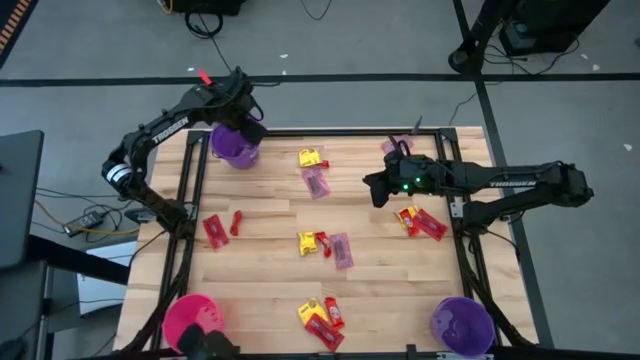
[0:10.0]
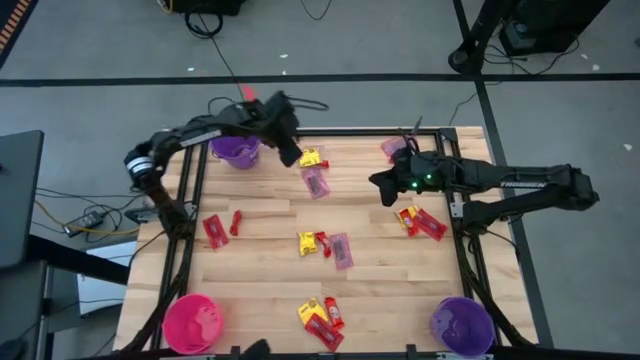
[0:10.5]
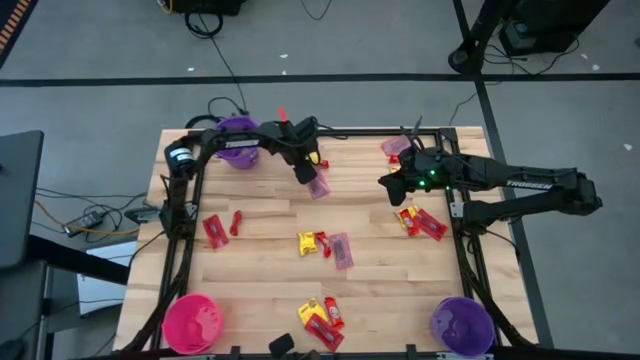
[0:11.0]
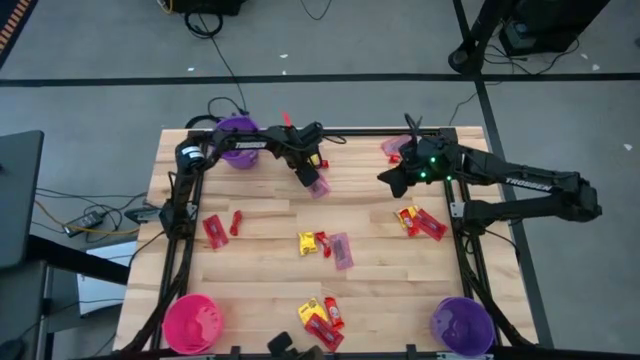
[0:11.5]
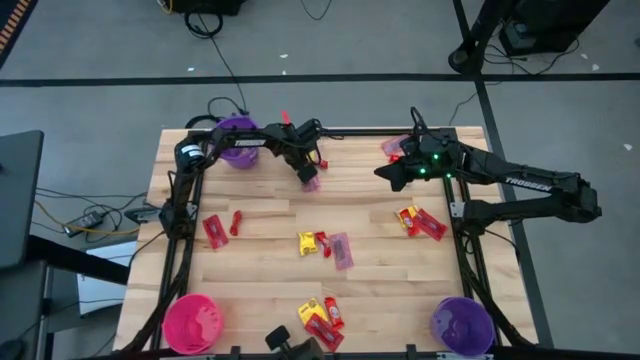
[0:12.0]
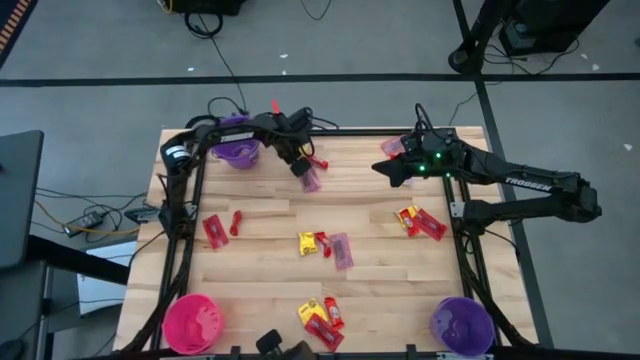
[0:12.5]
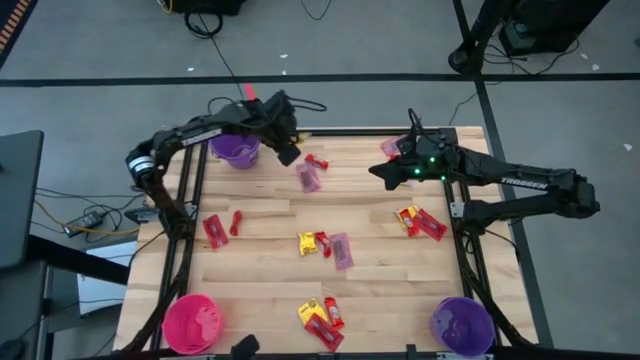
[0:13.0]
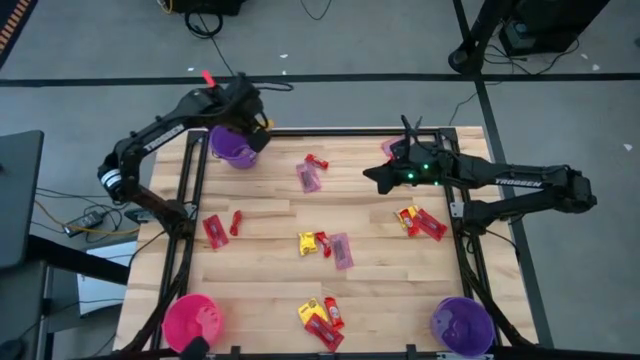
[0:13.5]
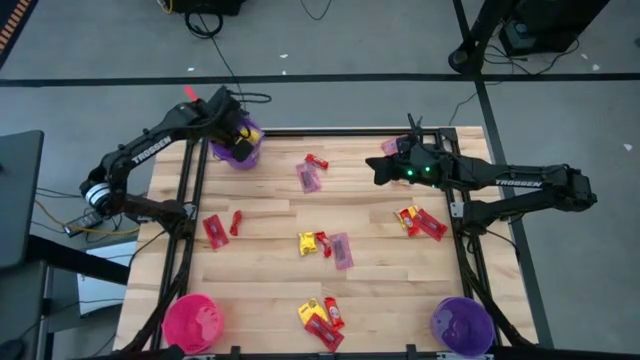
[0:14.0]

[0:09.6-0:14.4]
Task: Sort candy by brand, put in halloween buckets
Put the yellow candy into the top purple bucket

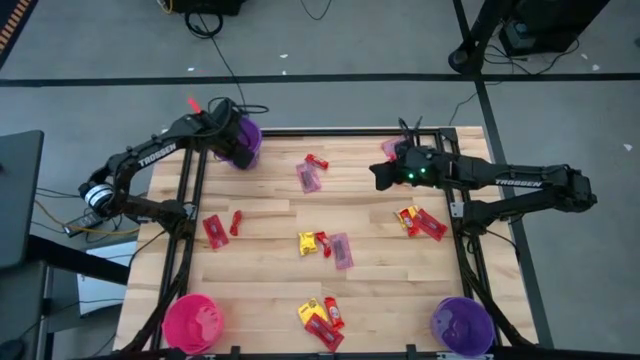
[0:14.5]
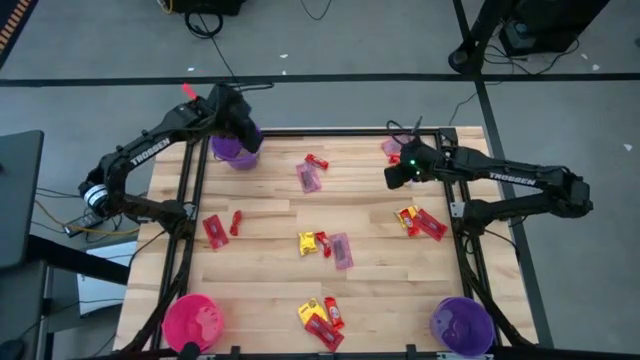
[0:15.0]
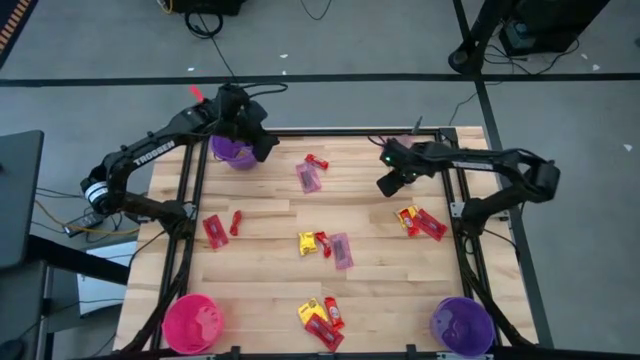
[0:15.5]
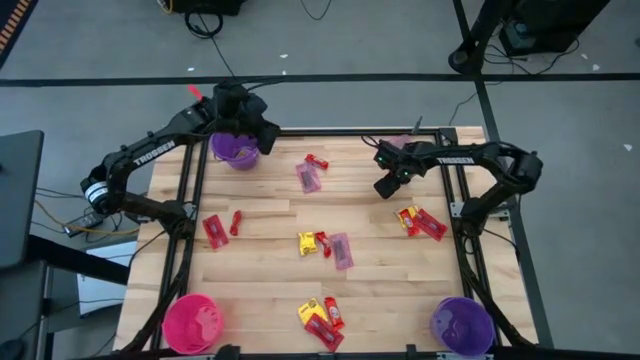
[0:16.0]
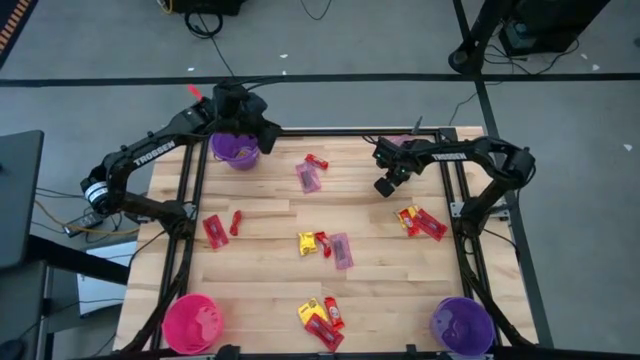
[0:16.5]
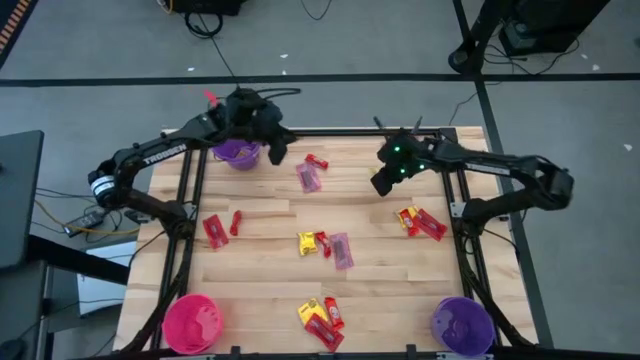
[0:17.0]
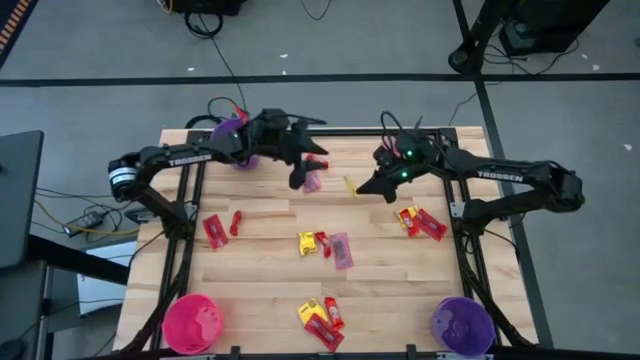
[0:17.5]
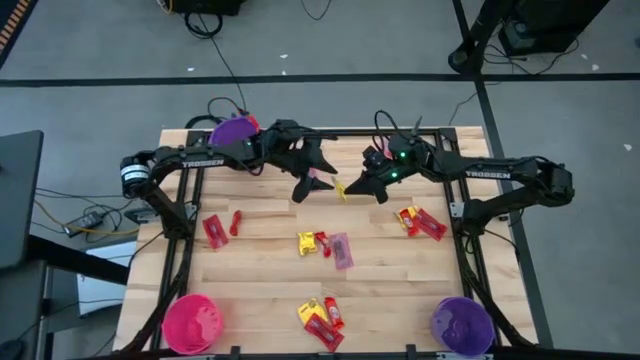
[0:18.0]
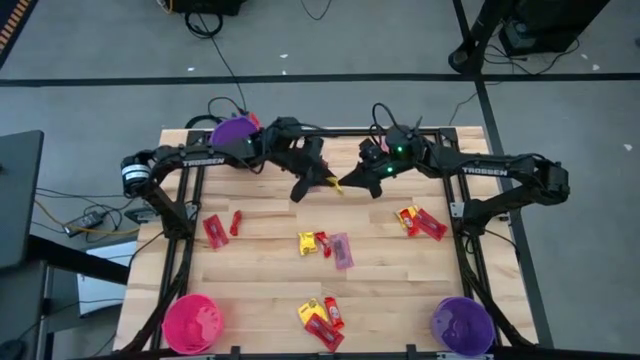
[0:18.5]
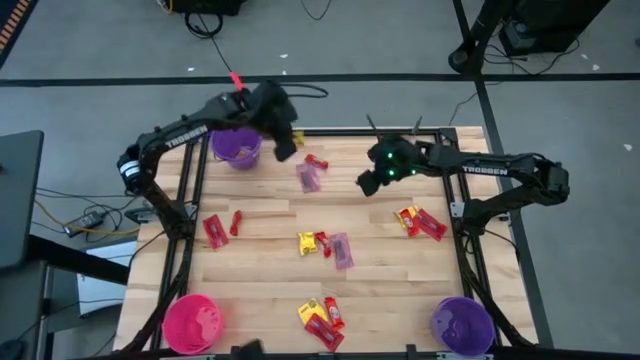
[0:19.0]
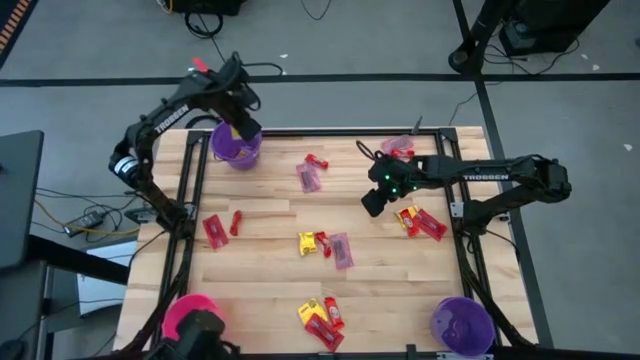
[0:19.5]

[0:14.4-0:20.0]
Put the yellow candy into the top purple bucket

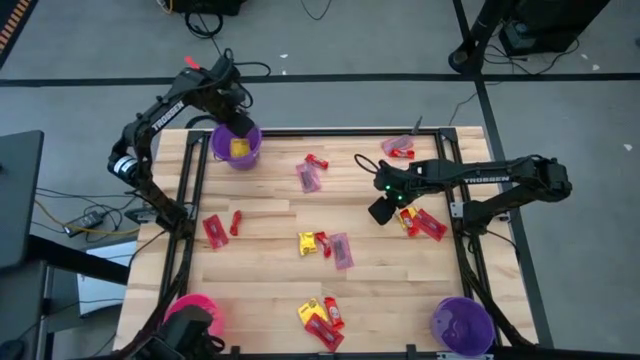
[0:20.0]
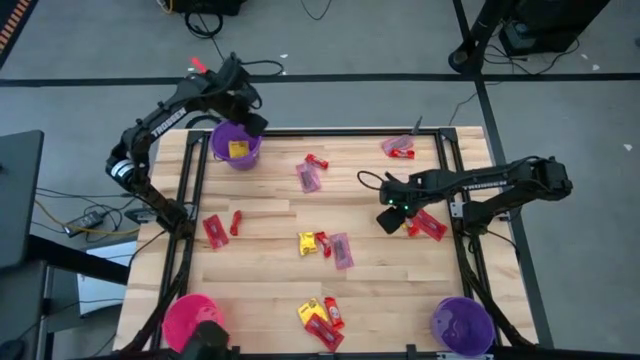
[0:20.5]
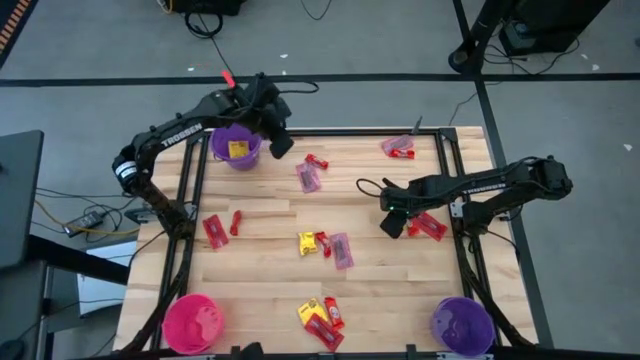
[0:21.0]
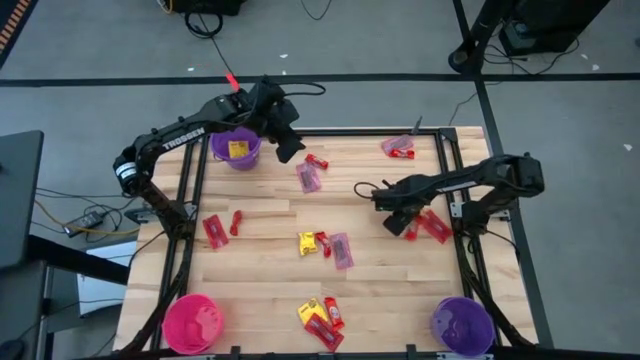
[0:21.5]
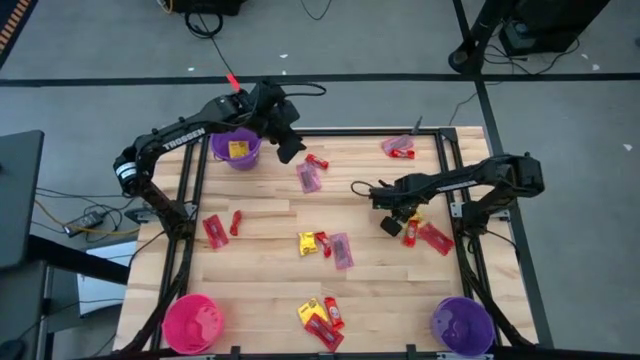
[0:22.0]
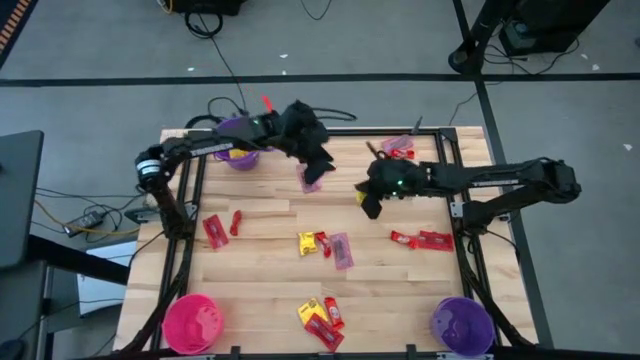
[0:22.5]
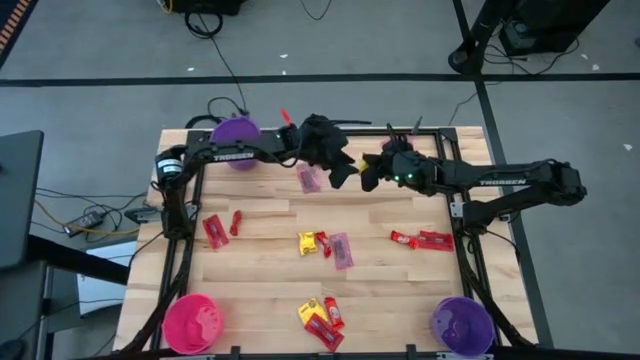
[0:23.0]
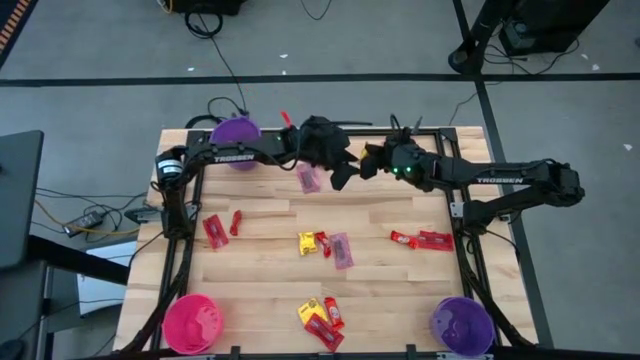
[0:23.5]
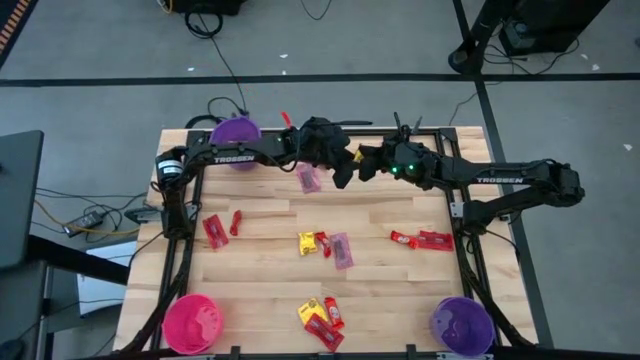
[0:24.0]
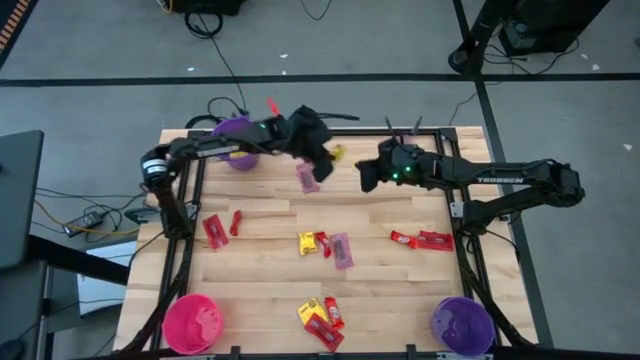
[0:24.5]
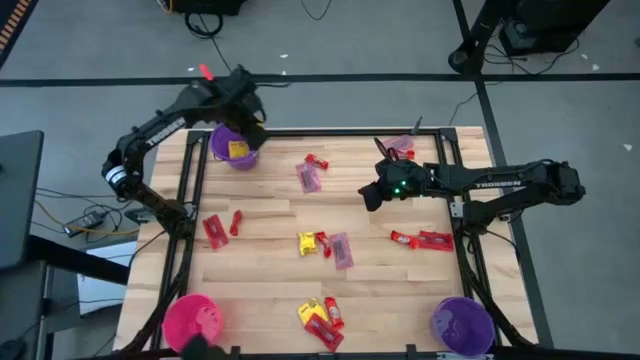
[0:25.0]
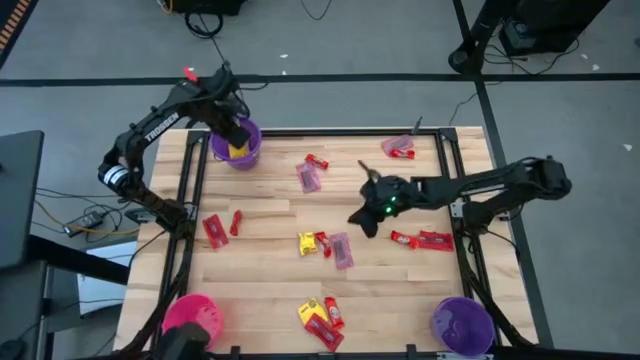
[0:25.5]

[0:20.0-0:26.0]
Put the yellow candy into the top purple bucket

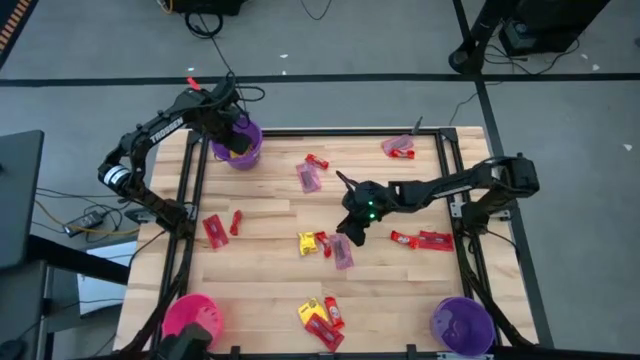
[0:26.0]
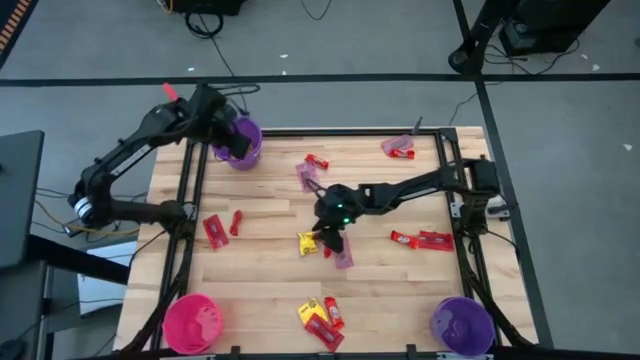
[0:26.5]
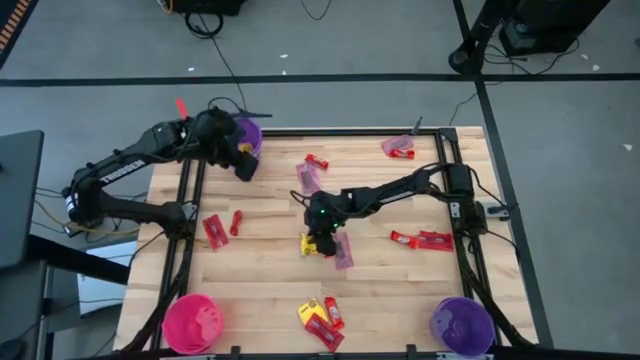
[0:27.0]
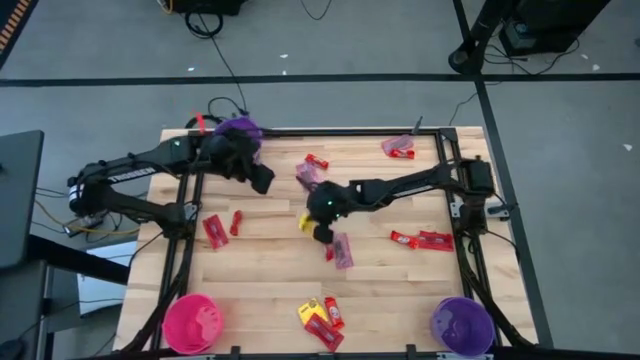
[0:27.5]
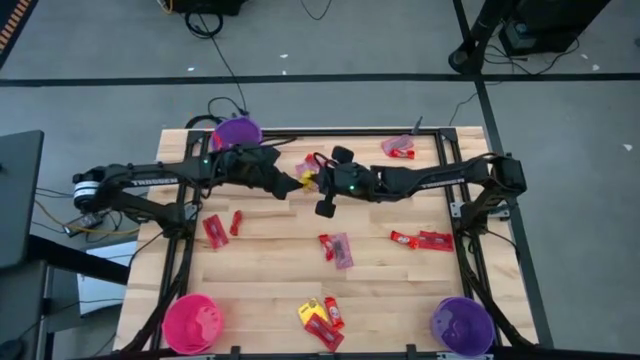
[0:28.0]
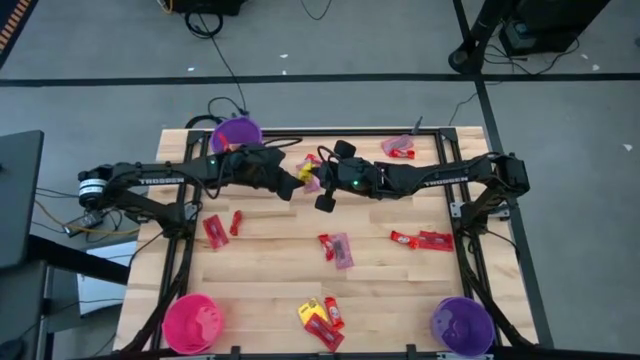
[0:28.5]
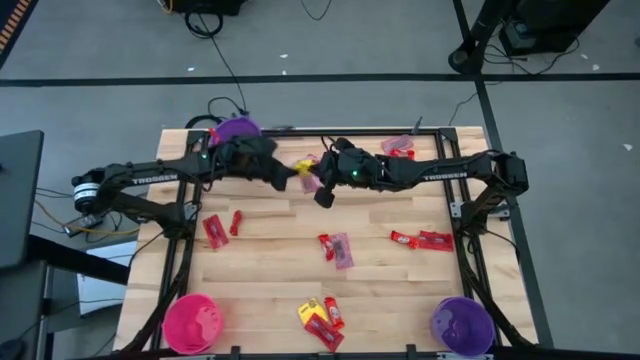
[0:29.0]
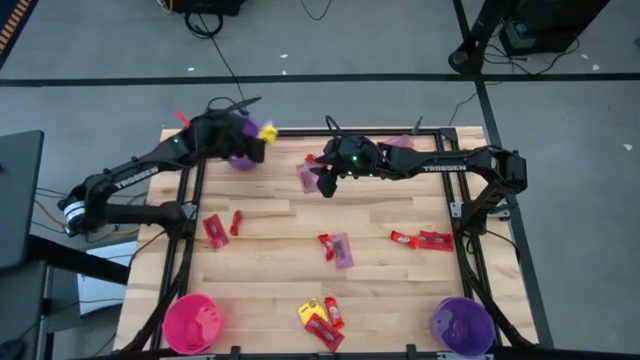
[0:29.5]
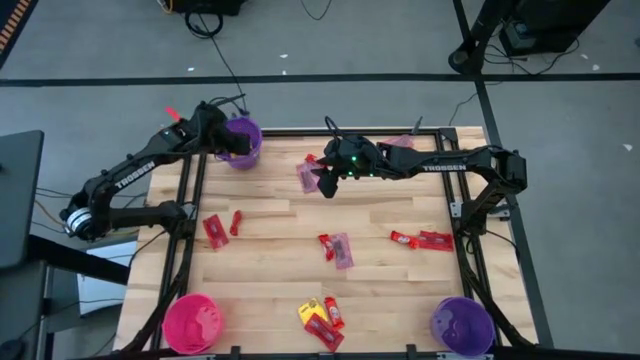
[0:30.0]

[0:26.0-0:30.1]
Put the yellow candy into the top purple bucket

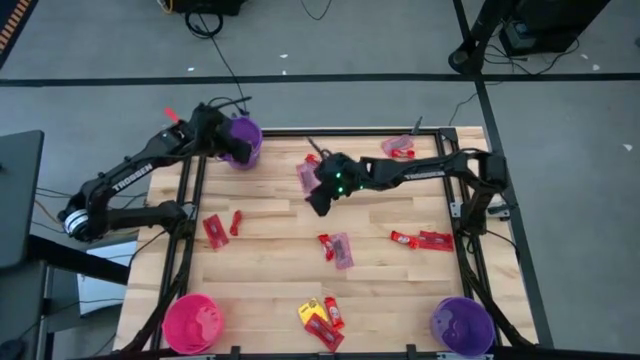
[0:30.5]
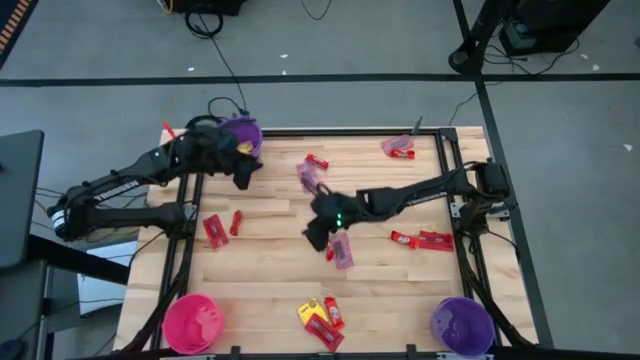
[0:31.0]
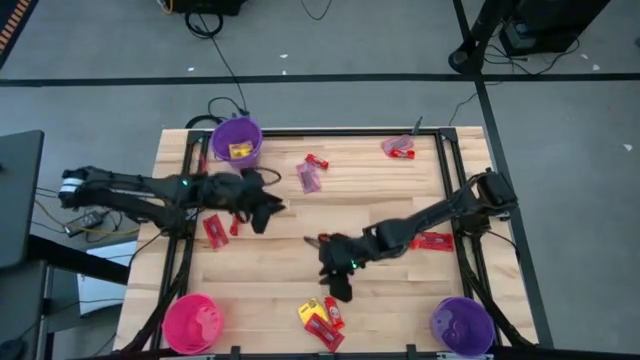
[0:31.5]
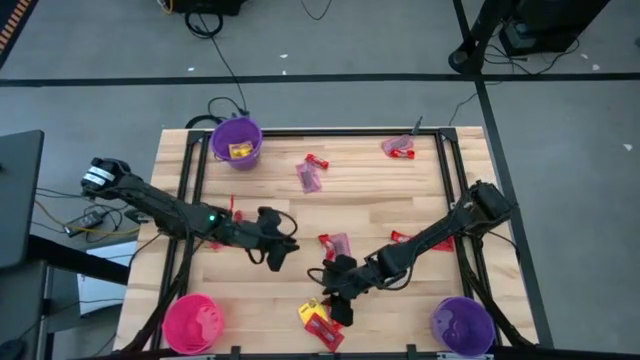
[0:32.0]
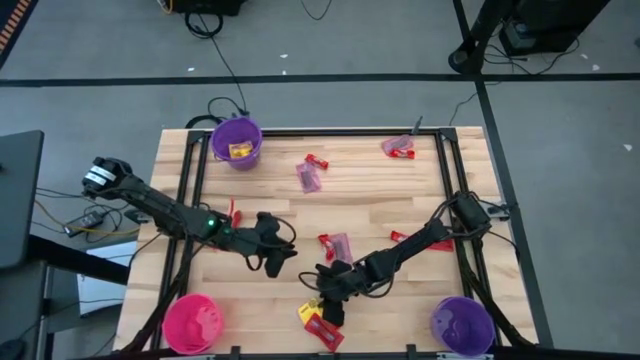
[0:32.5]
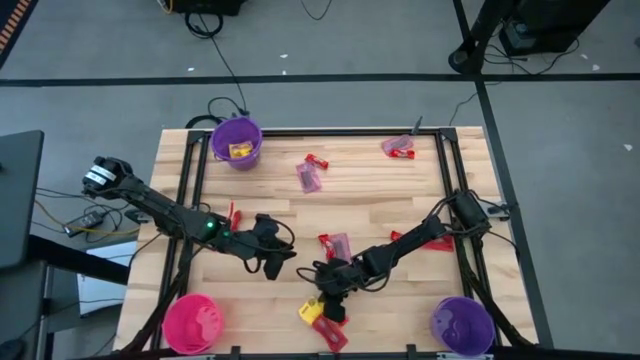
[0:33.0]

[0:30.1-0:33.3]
Put the yellow candy into the top purple bucket
